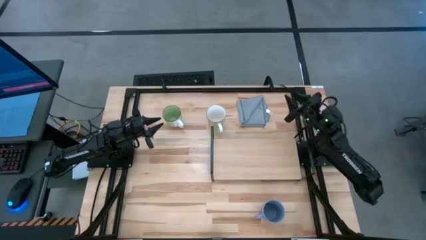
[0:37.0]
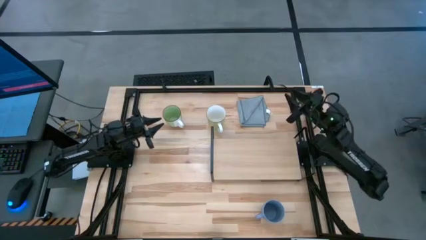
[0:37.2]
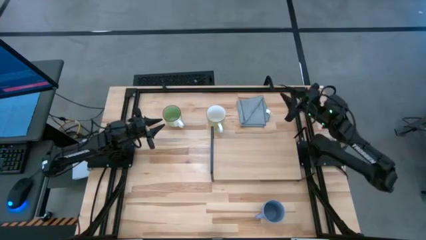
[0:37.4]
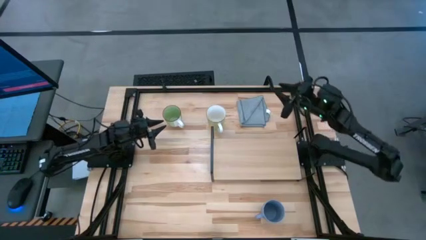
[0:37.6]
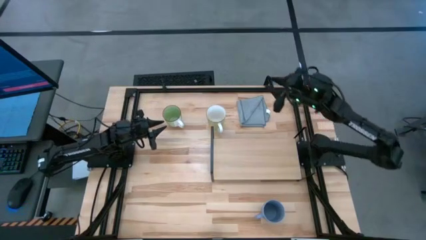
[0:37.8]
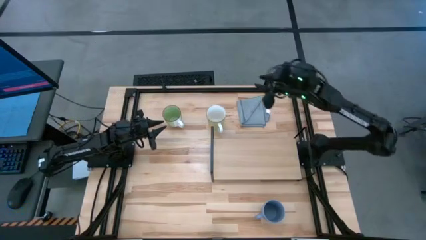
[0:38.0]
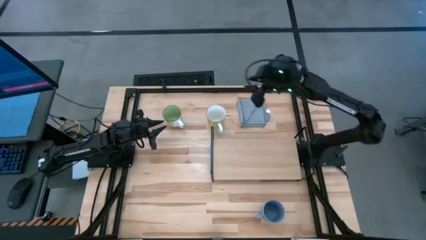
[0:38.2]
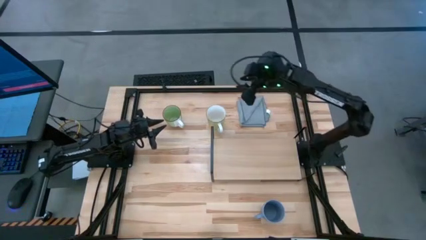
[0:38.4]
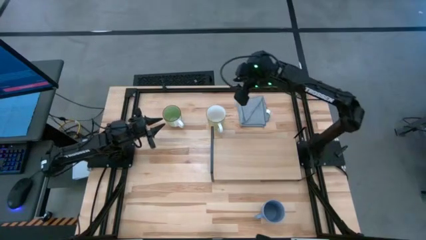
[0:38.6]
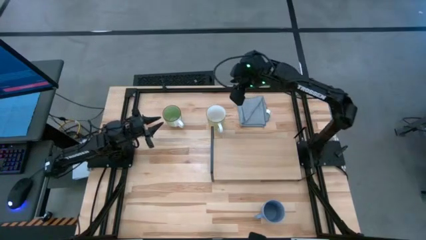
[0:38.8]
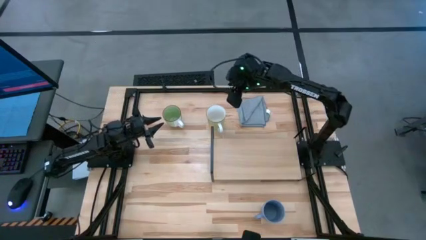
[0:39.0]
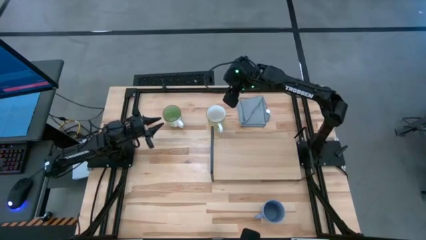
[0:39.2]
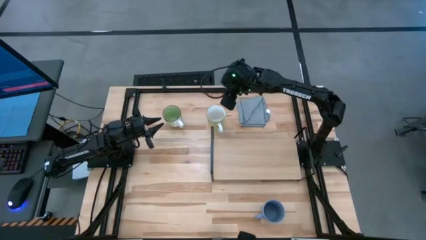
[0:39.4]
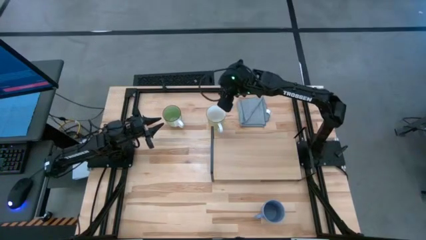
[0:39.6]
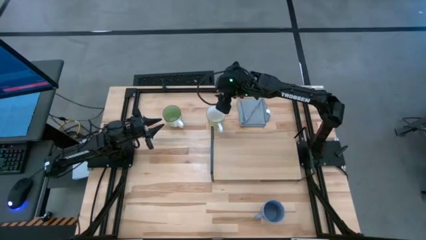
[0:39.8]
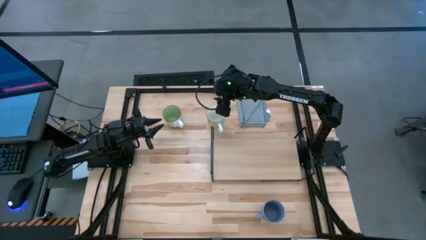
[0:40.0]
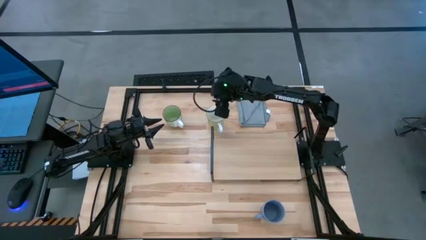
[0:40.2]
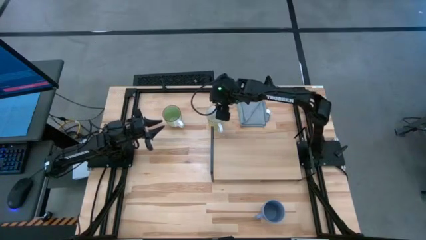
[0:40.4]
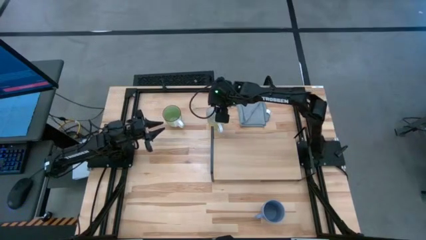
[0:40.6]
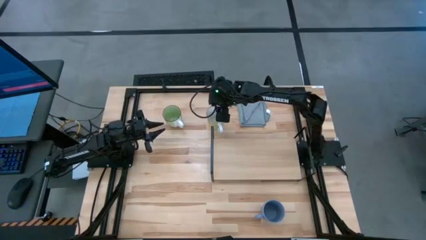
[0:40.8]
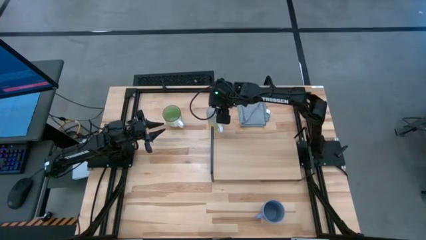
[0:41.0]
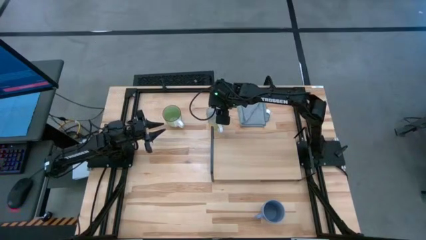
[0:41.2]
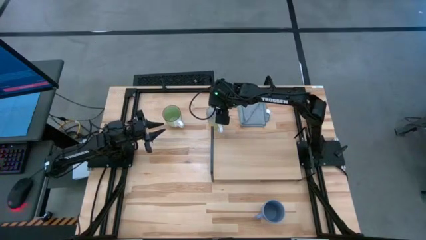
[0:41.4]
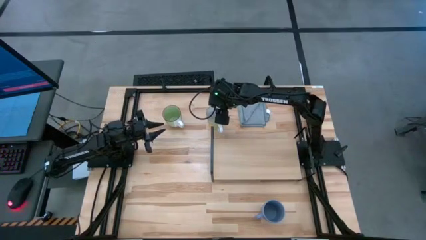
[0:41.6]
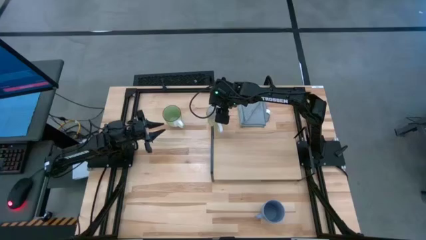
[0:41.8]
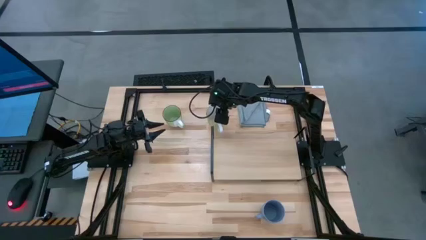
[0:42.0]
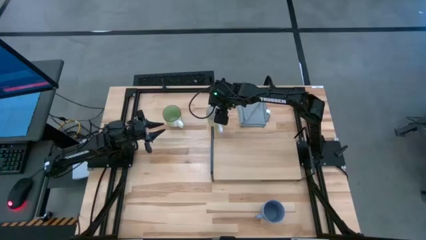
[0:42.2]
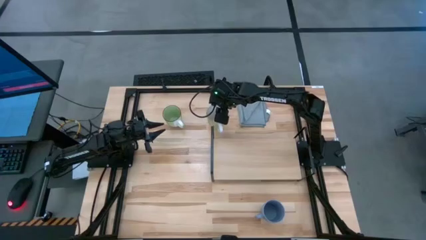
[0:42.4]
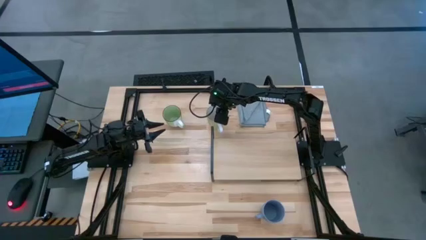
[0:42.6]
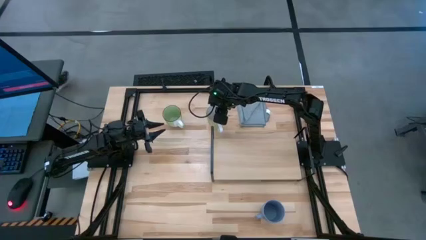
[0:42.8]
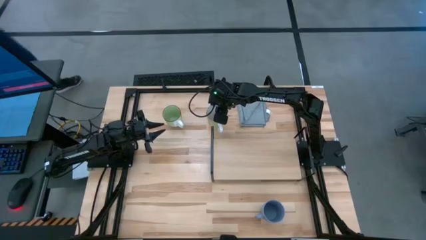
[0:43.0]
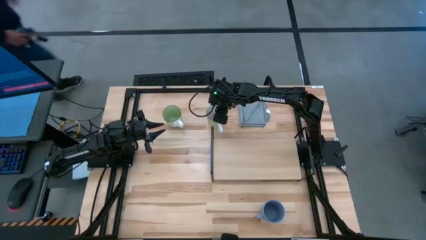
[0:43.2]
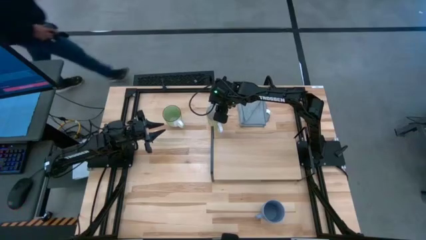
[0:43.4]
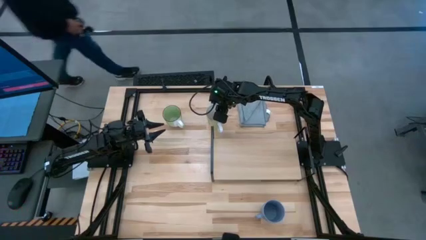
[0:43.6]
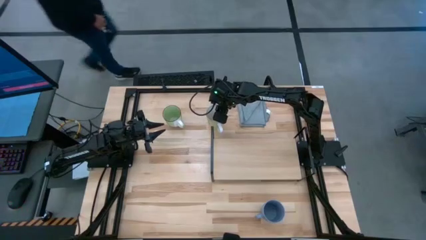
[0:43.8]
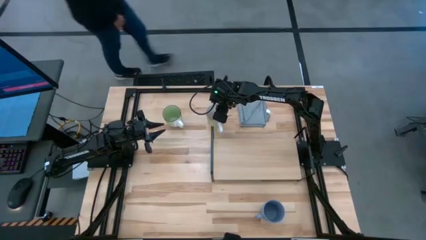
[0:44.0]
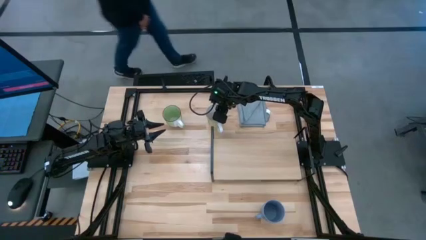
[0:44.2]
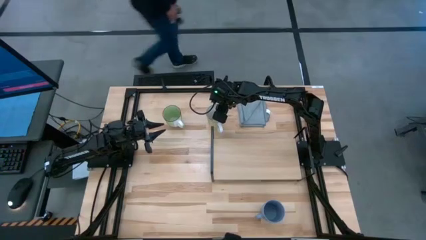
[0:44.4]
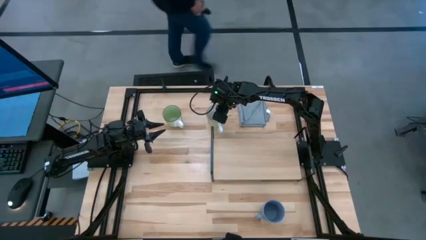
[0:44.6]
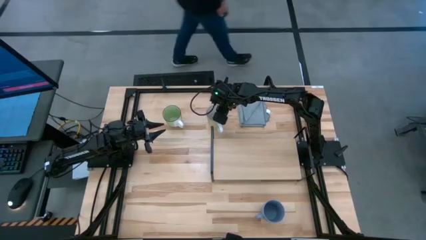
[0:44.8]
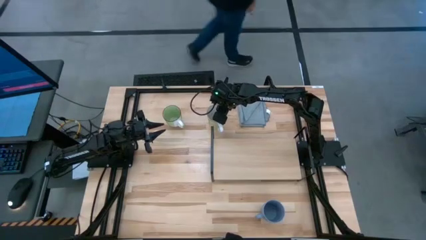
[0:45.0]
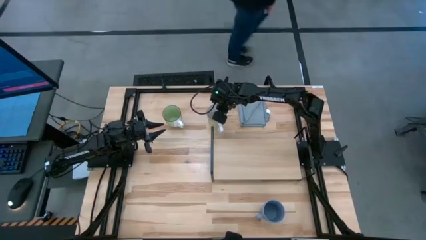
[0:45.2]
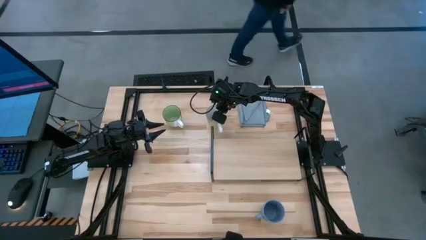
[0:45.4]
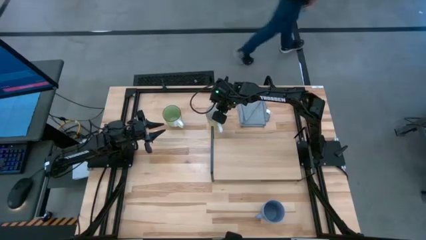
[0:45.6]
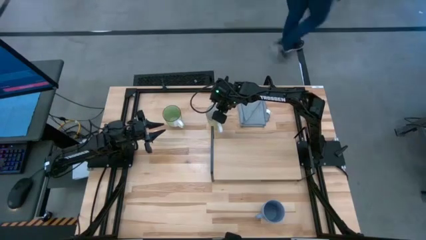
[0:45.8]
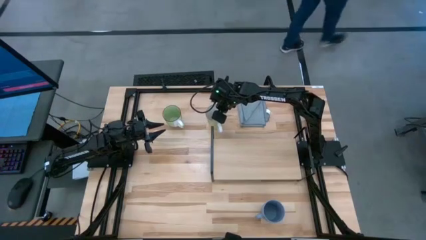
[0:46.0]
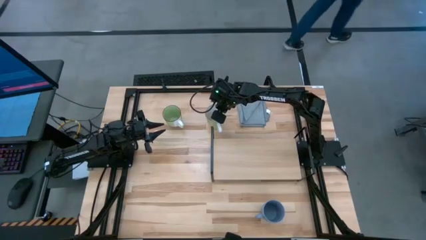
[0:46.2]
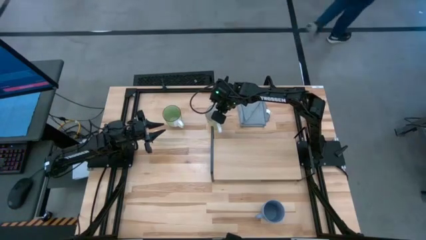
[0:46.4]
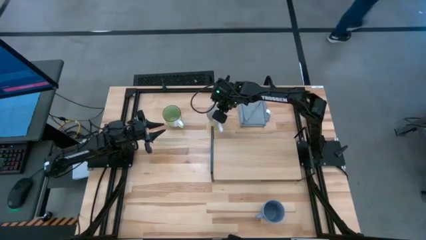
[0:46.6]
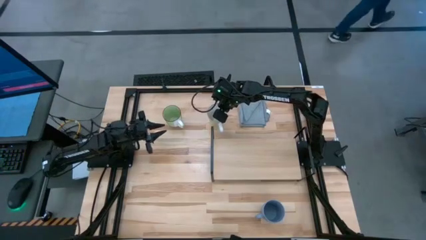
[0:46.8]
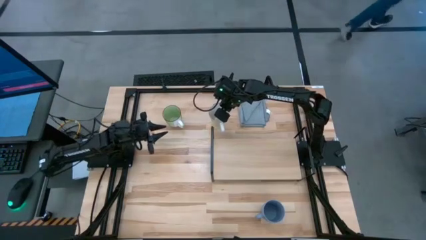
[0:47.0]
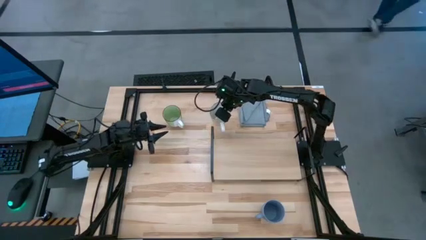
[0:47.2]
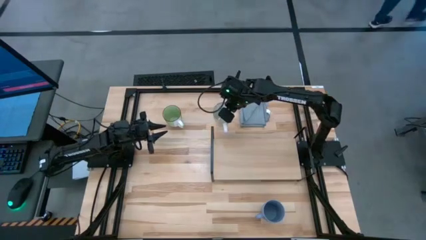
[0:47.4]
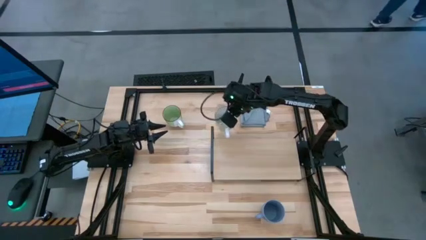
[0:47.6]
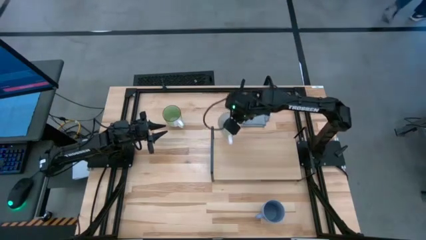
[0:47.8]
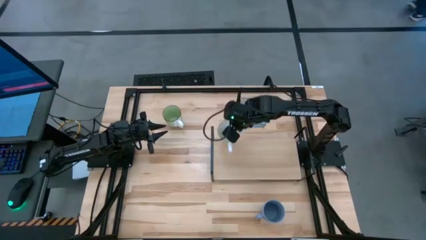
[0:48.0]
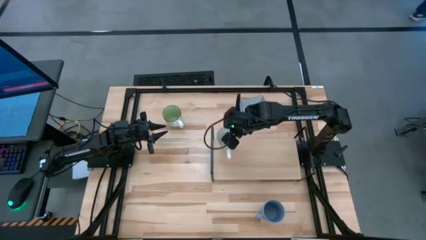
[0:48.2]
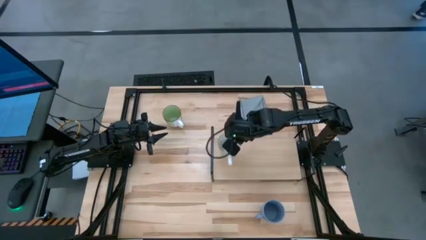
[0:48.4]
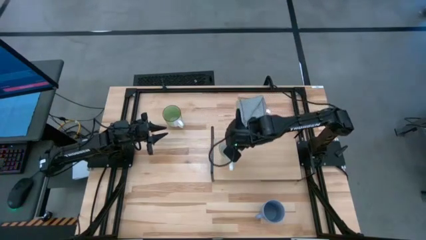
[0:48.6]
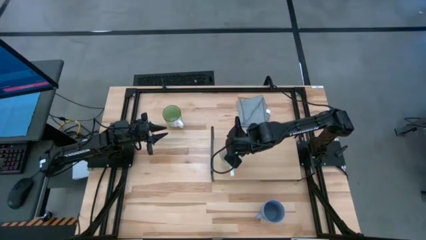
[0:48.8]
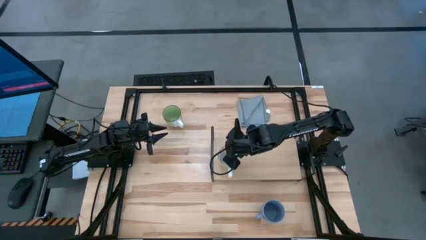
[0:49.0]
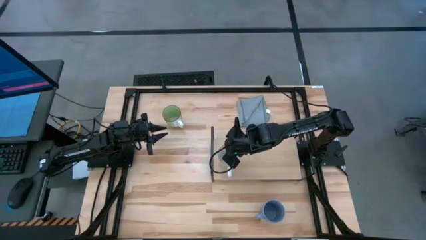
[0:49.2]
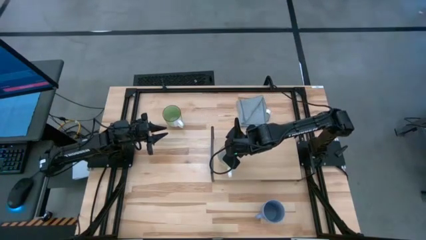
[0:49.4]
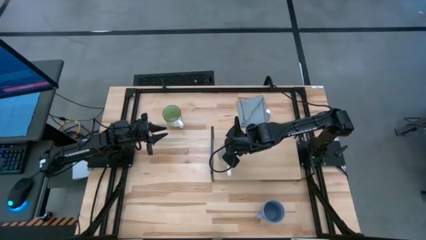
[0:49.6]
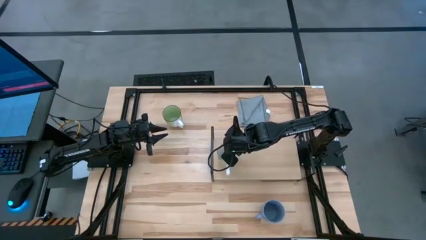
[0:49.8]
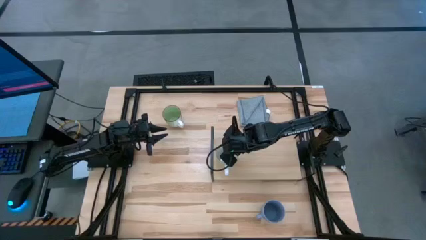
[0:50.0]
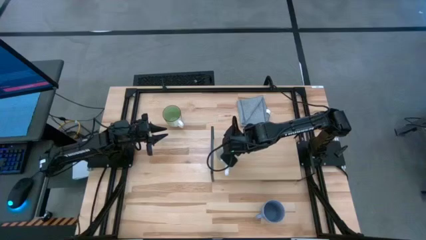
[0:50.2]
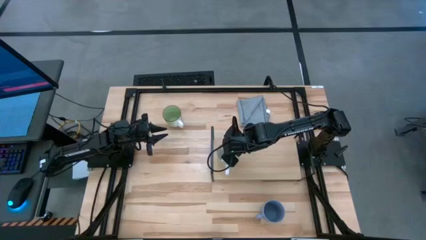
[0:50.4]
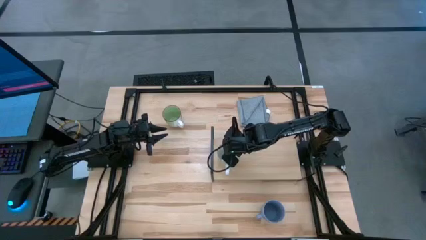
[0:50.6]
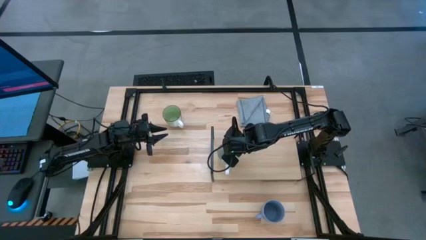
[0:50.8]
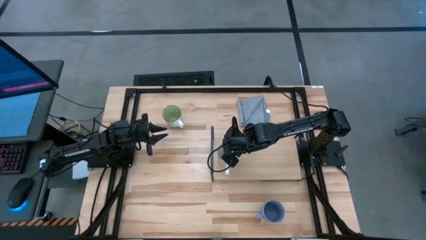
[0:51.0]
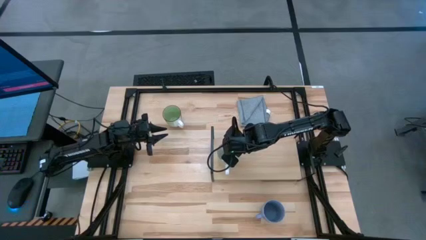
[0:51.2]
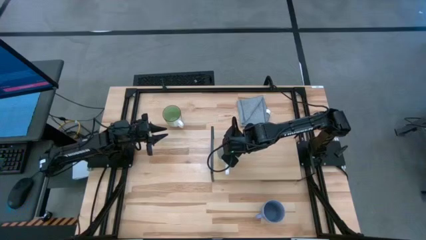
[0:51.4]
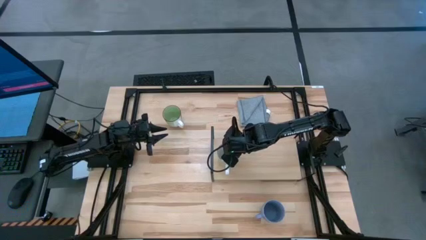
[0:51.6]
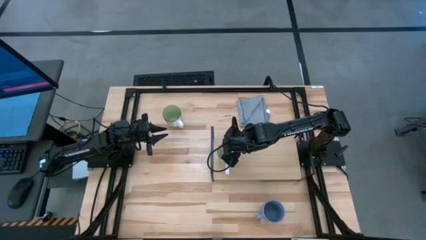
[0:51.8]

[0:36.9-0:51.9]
Task: Stack small to large cups/mugs on shelf
Put the light green mug on the shelf
